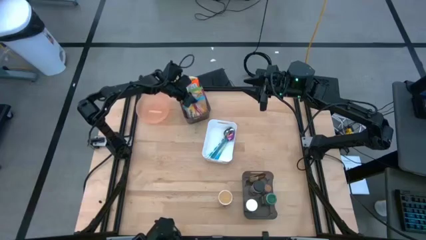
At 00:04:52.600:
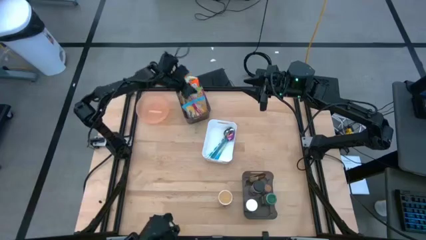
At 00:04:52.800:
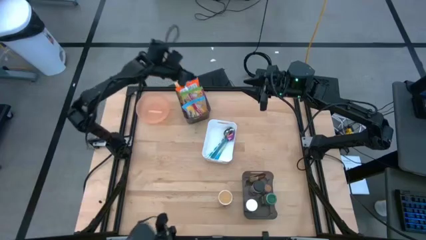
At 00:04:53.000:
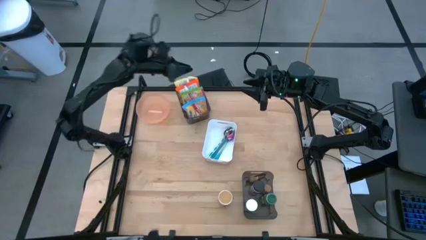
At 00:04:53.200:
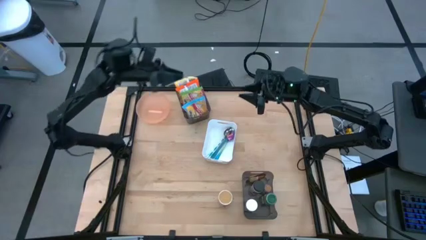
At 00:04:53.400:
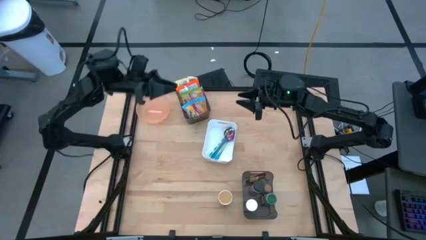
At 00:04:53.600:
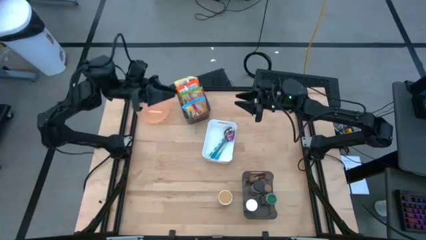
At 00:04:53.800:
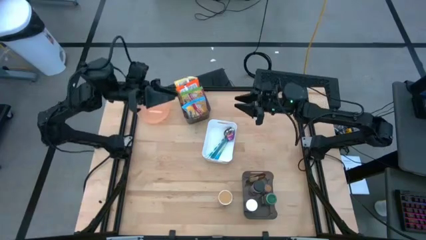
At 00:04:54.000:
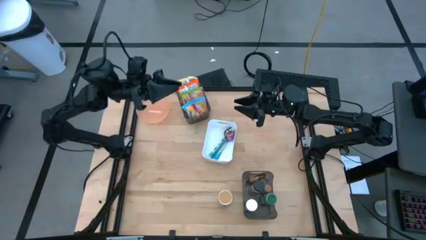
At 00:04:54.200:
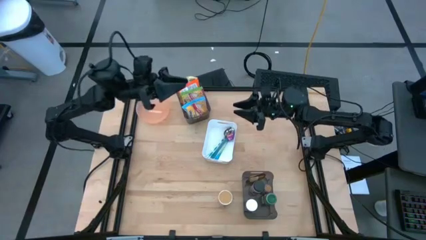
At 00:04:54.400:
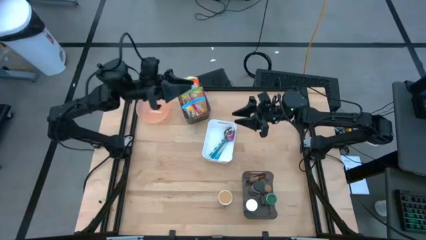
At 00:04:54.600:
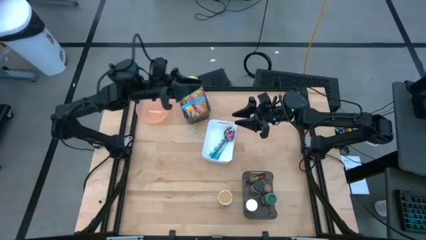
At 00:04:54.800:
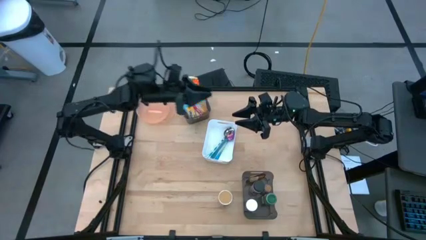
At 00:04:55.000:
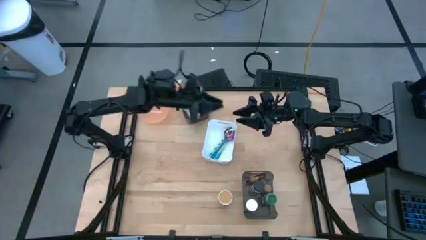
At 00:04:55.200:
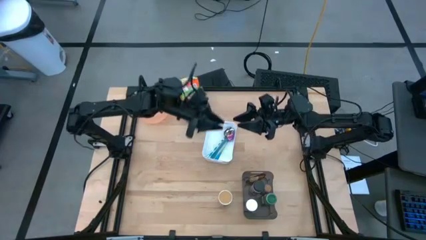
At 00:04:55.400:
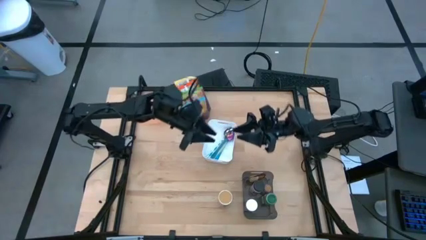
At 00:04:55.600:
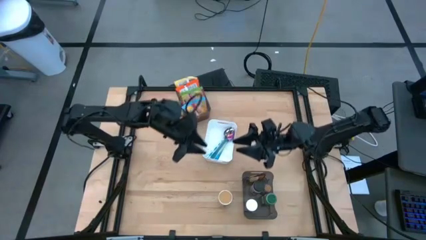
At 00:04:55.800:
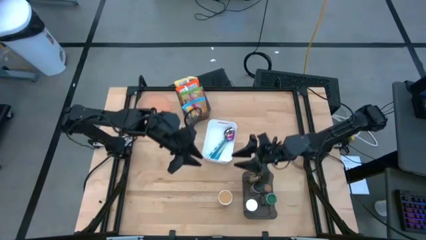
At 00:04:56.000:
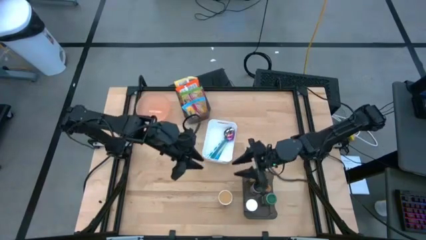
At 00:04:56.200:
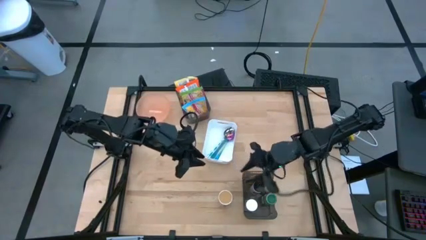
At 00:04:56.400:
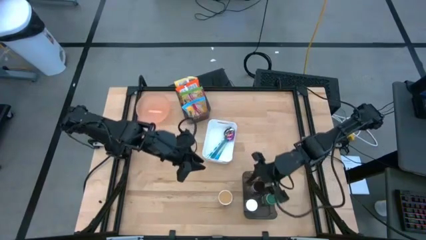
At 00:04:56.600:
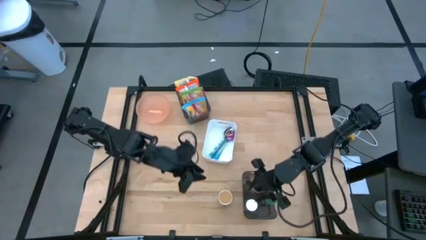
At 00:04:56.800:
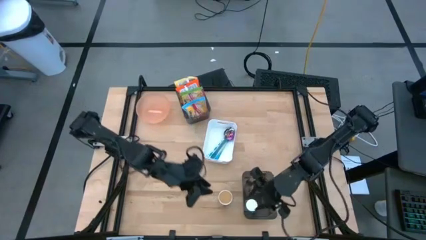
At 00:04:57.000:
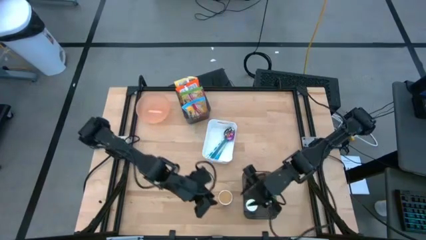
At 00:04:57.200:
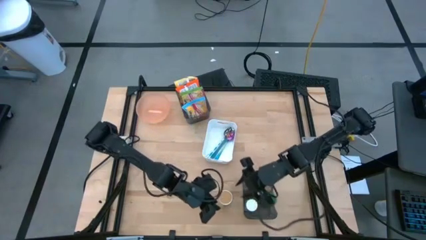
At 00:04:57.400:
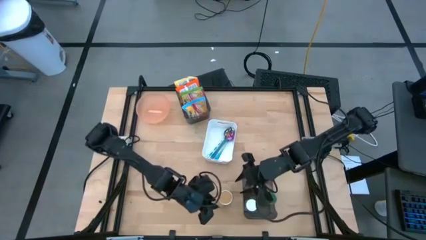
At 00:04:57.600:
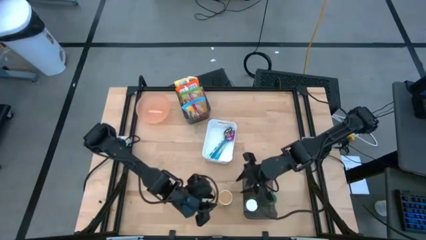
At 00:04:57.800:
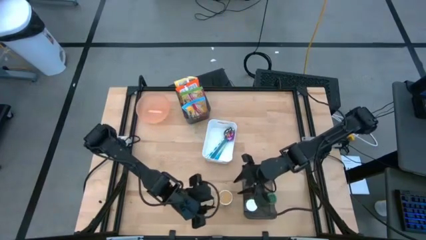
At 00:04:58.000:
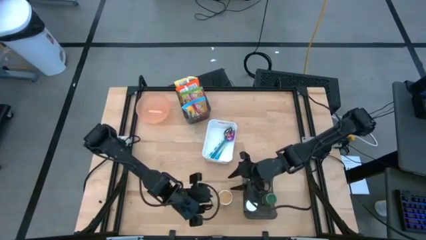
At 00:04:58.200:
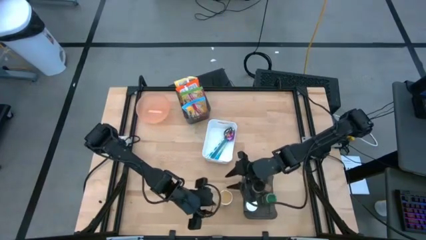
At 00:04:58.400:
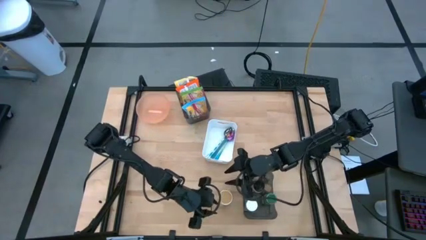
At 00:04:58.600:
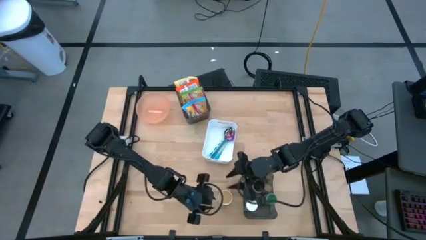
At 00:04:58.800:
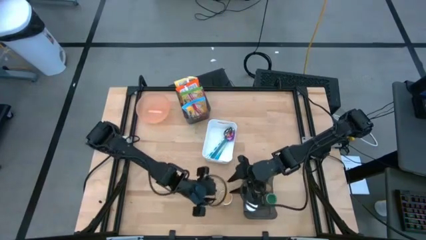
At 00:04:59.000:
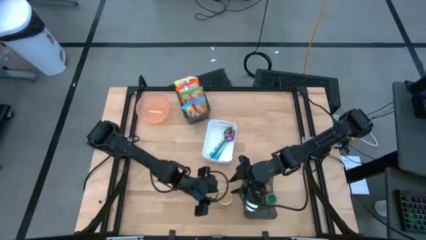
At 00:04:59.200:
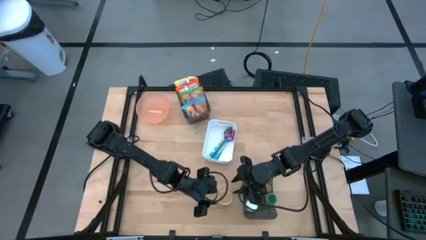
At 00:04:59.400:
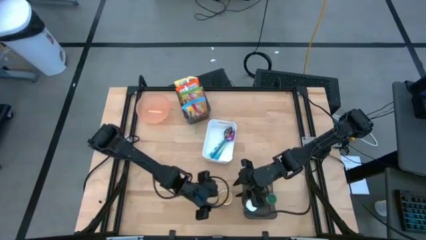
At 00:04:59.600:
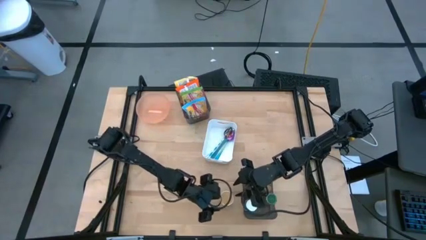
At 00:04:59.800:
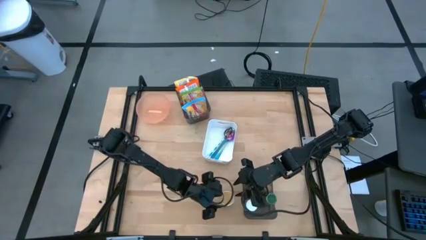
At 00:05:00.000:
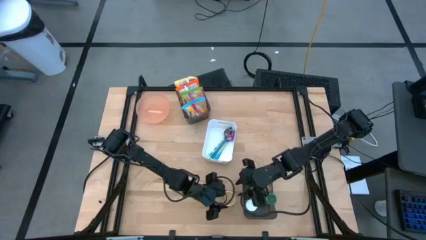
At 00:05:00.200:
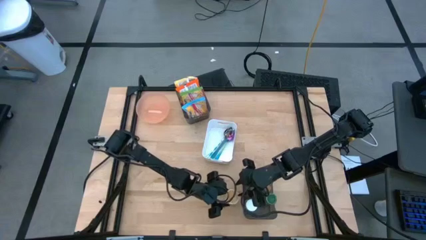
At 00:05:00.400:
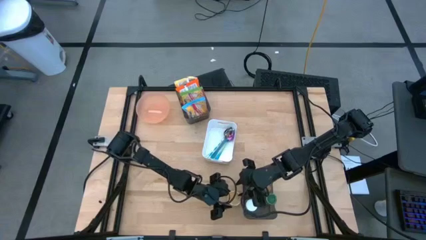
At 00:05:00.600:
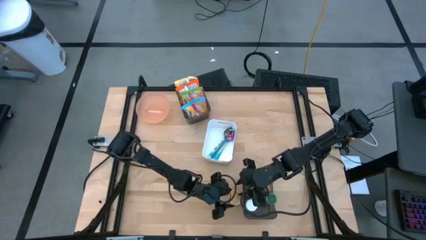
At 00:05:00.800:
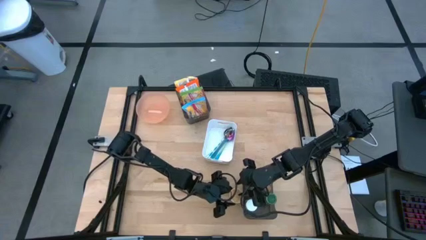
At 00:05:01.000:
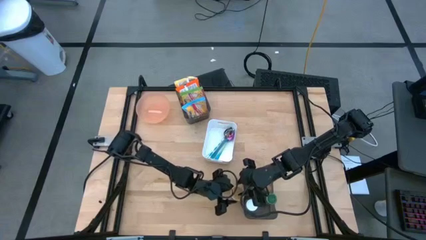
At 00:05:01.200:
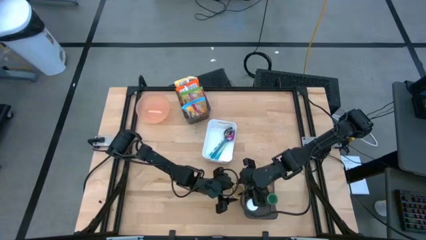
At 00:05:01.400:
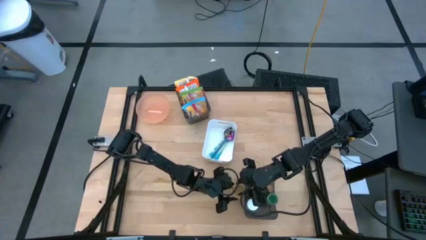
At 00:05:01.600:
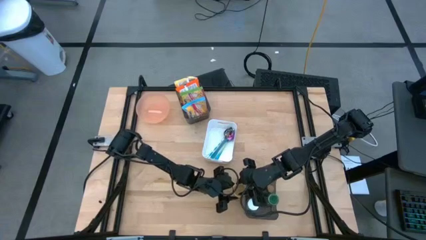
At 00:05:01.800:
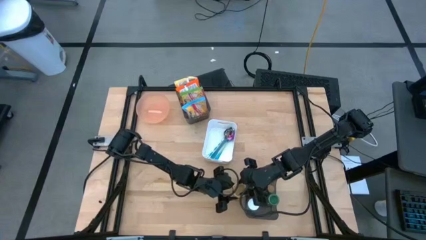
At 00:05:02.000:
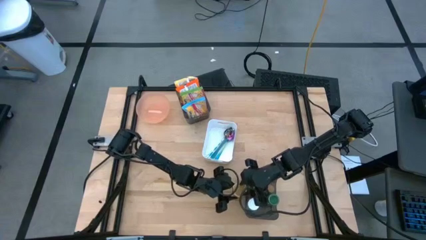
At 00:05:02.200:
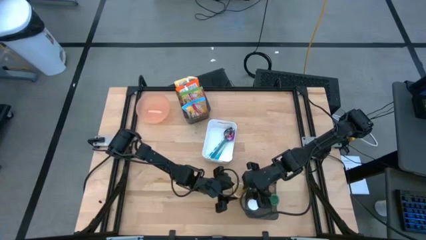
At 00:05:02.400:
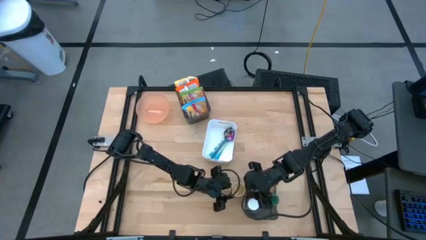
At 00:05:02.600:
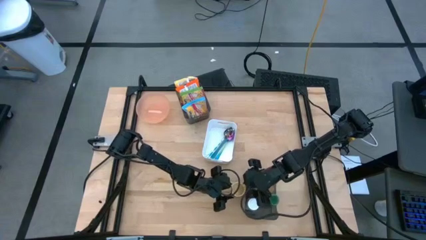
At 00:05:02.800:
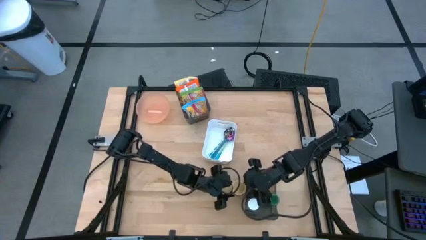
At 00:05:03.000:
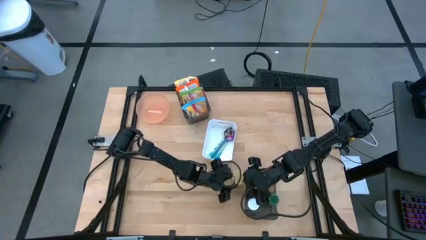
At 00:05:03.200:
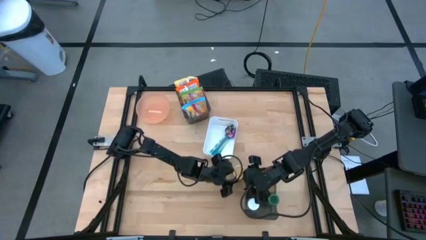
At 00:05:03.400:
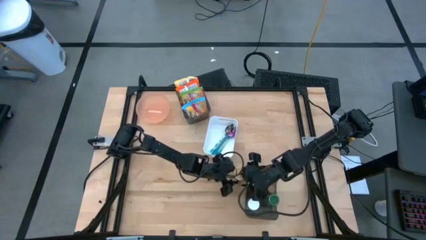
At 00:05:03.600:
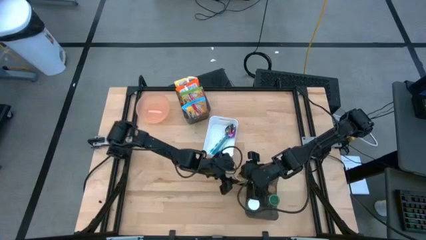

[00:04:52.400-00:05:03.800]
Task: Pick & Place Food Item
Put the gold seasoning bottle into the bottom black bin

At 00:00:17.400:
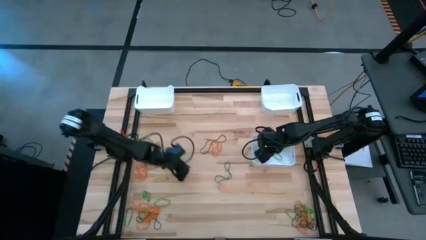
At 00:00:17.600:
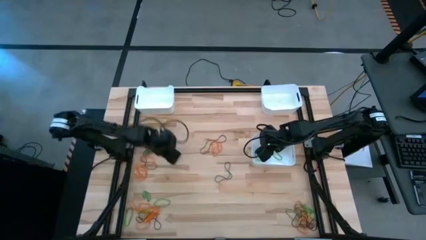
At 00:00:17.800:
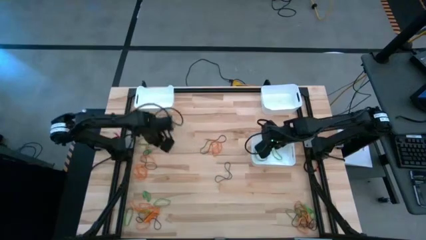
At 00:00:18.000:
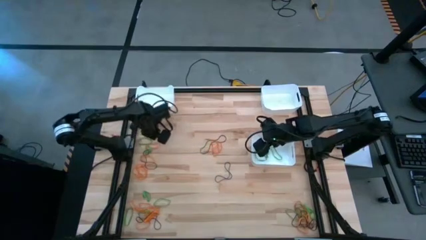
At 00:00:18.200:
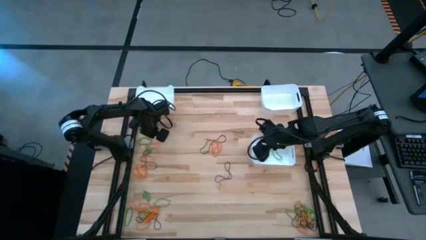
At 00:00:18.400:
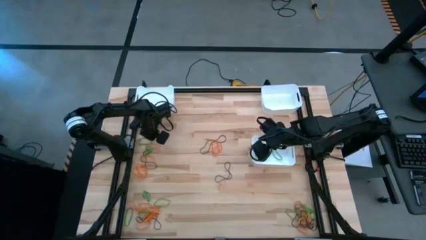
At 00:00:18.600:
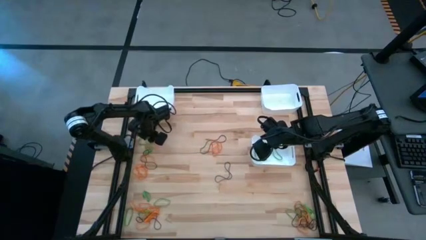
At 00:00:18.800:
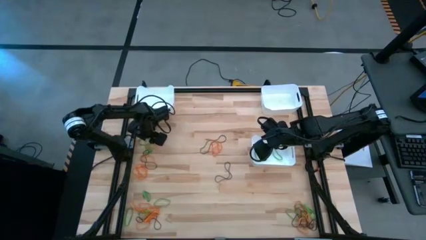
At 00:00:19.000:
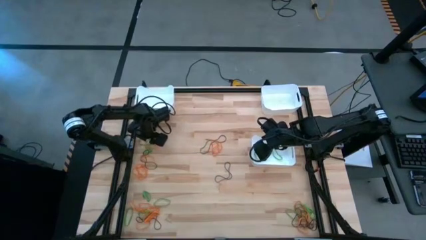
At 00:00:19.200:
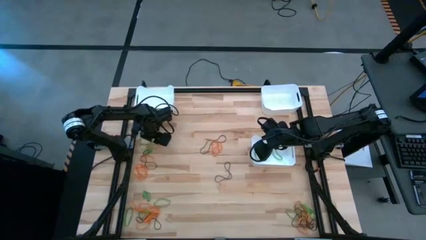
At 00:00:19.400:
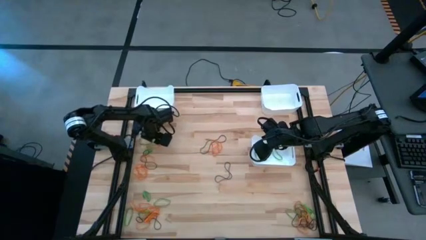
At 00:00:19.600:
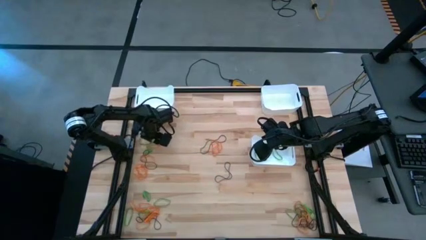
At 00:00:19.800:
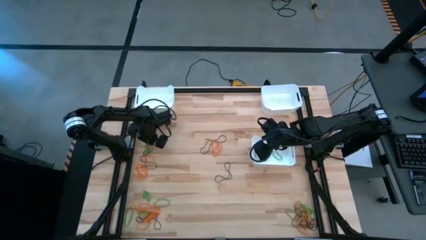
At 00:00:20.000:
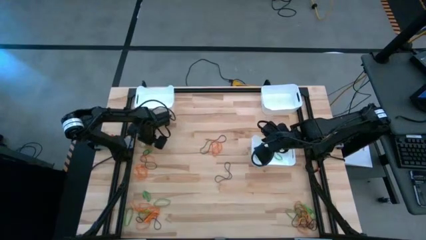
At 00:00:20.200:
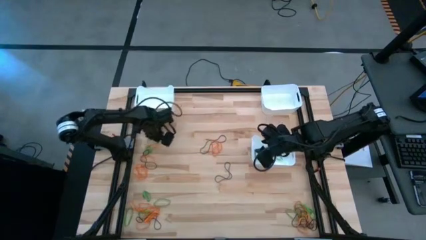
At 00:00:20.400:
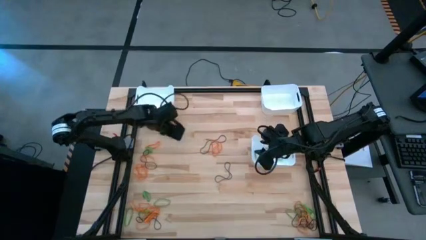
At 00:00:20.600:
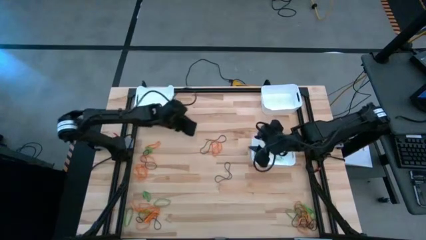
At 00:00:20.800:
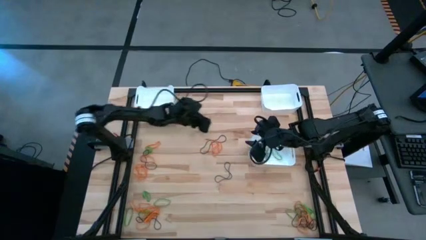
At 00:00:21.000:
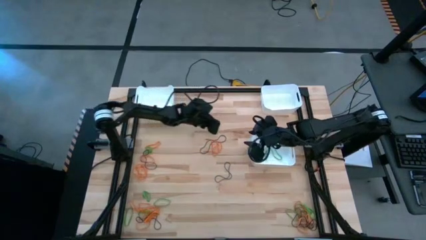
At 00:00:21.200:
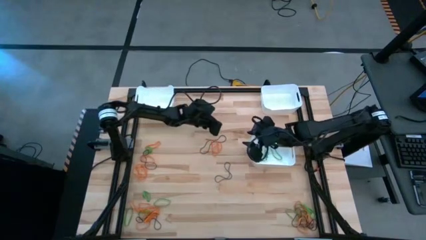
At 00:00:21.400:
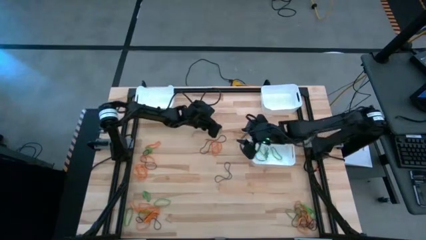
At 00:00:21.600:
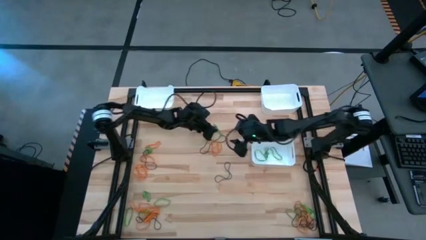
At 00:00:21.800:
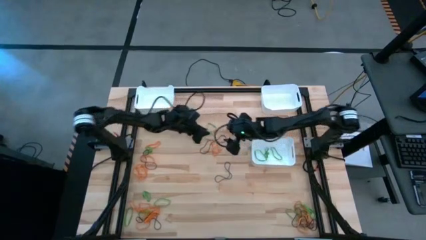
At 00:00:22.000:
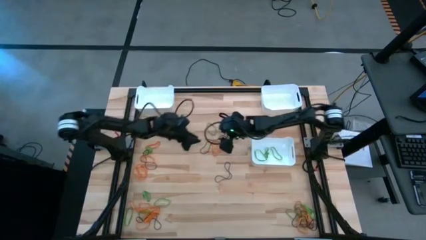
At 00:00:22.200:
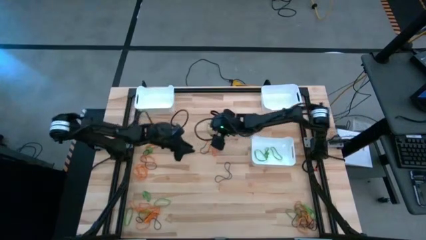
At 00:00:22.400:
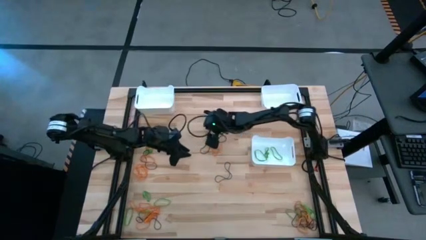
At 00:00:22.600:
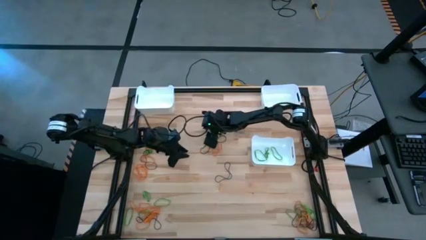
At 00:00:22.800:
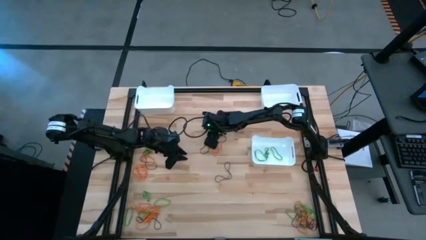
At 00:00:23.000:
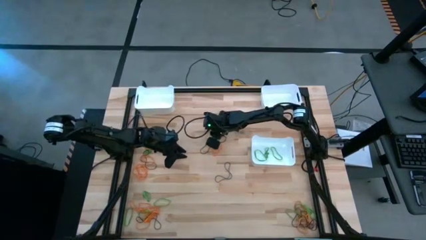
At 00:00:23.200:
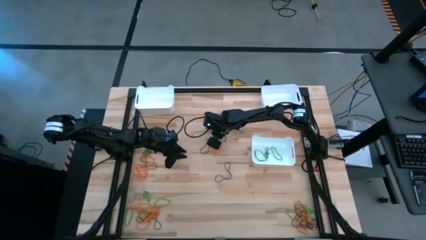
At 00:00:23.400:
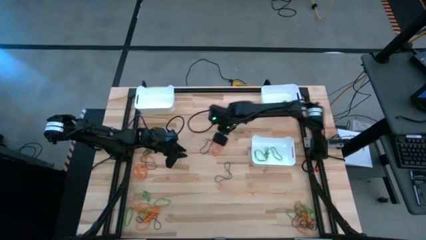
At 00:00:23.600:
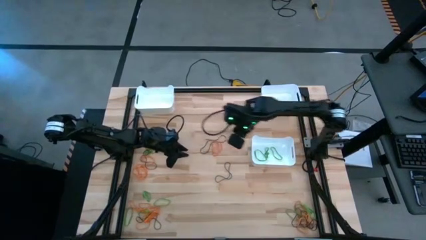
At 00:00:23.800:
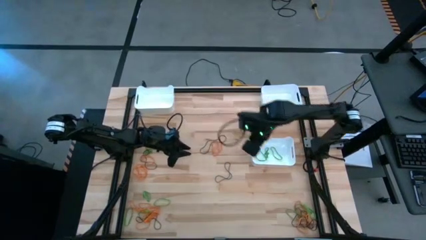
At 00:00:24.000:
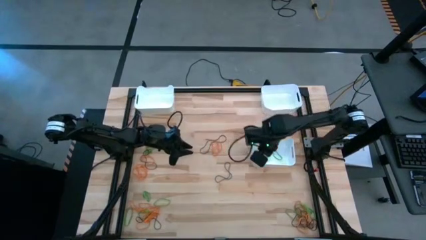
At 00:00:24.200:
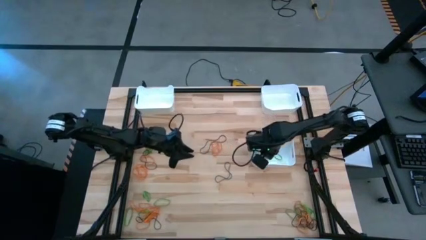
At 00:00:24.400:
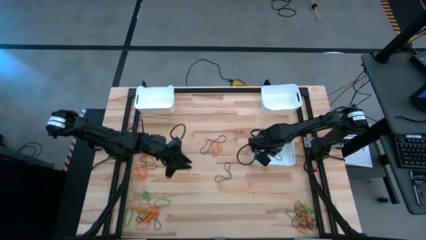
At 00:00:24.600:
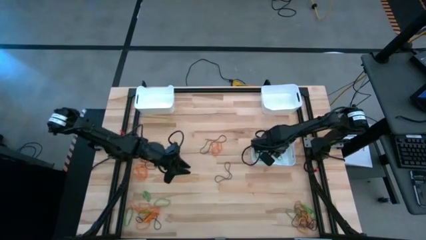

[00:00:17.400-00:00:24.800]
Task: Sort rubber bands into baskets
Put the green rubber band into the bottom white bin
